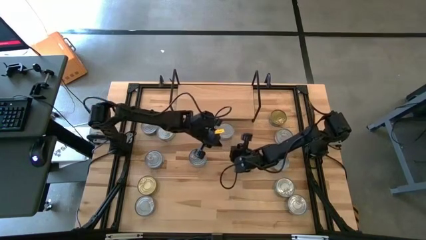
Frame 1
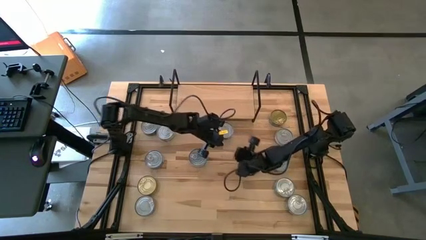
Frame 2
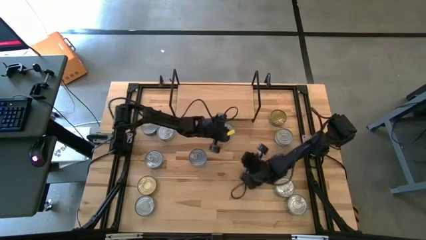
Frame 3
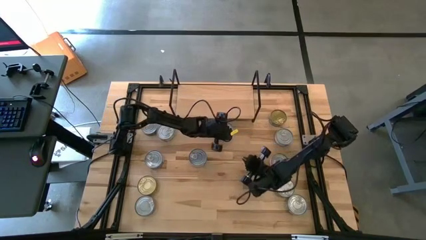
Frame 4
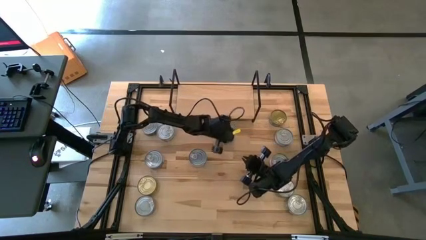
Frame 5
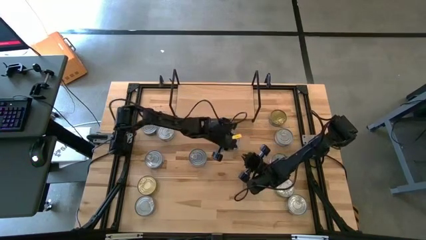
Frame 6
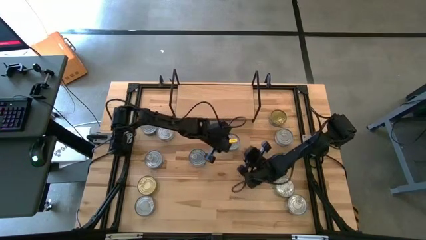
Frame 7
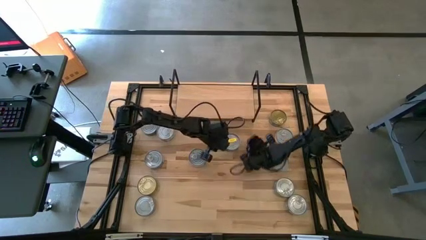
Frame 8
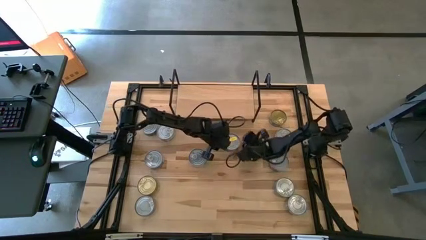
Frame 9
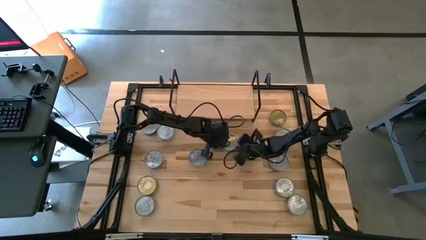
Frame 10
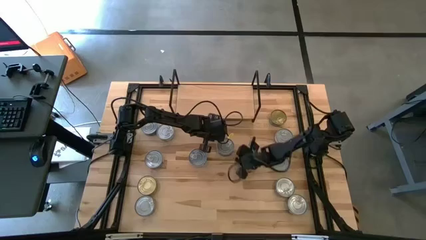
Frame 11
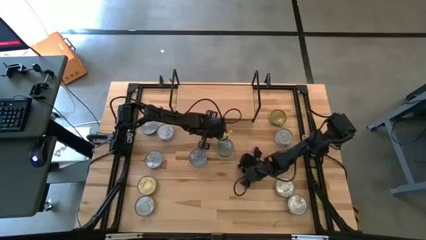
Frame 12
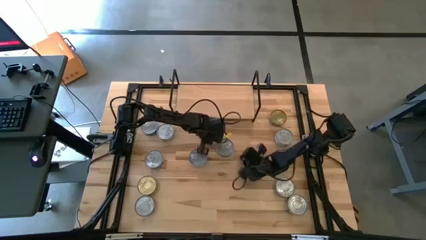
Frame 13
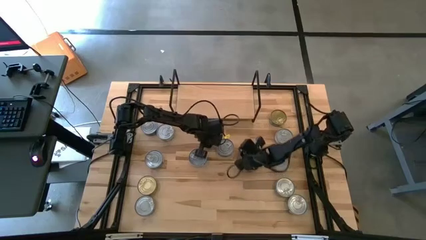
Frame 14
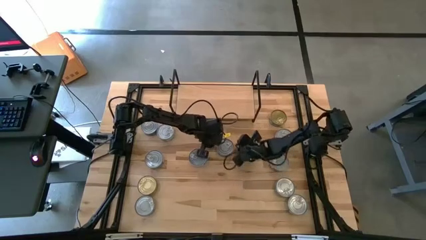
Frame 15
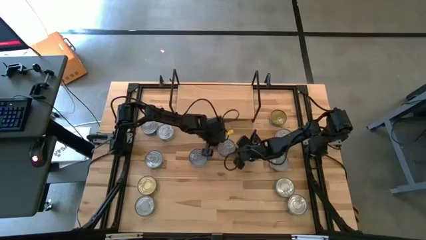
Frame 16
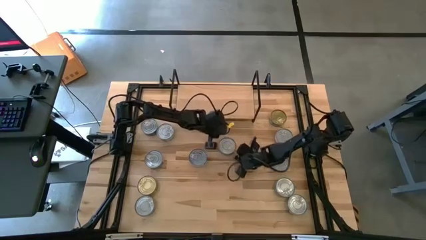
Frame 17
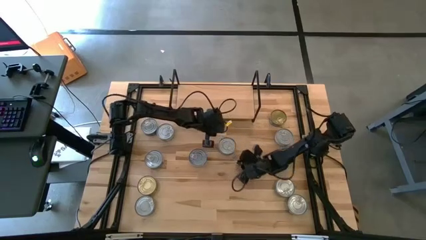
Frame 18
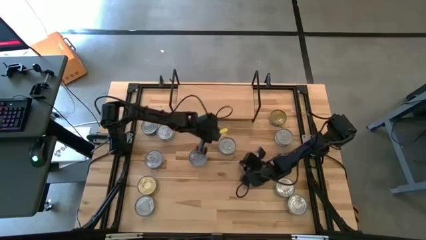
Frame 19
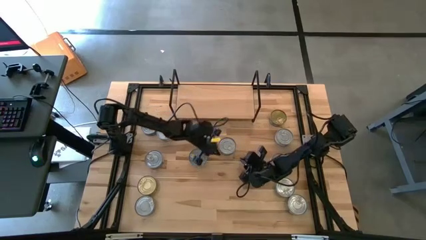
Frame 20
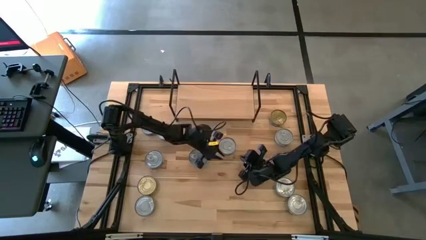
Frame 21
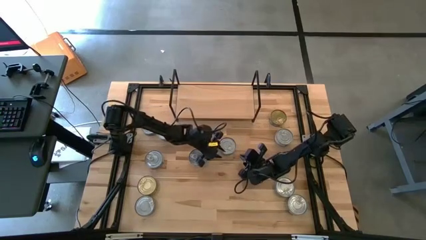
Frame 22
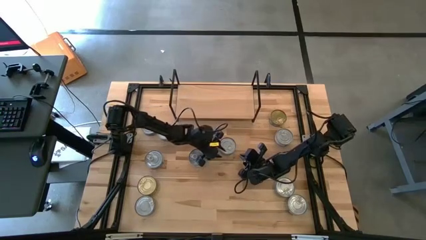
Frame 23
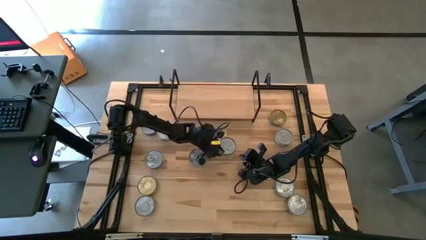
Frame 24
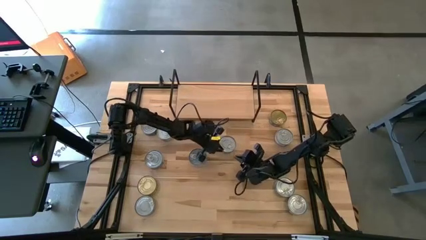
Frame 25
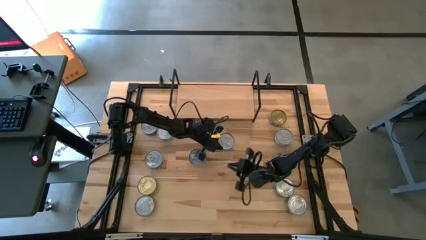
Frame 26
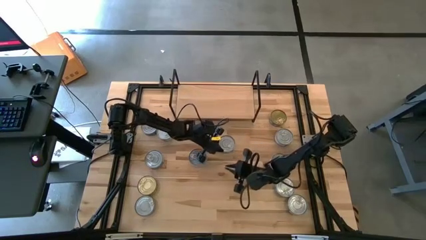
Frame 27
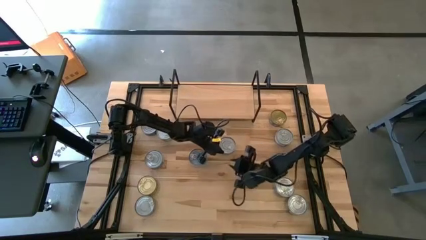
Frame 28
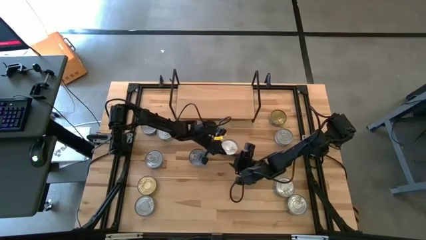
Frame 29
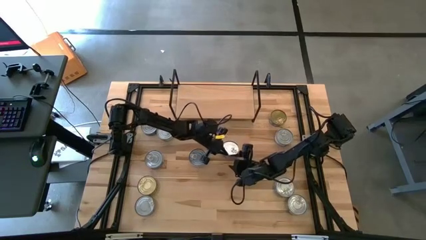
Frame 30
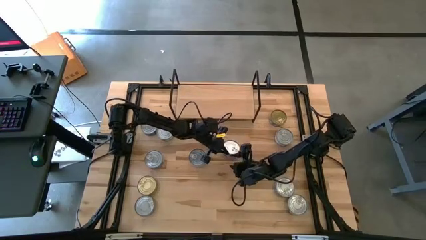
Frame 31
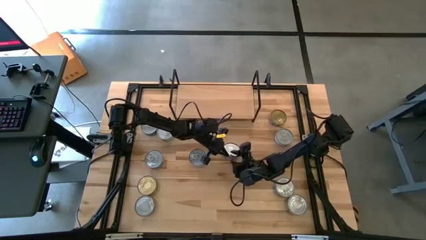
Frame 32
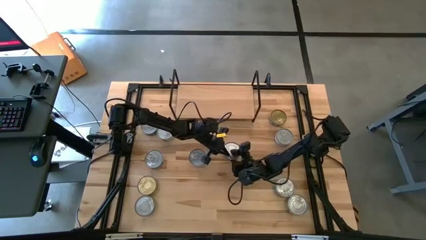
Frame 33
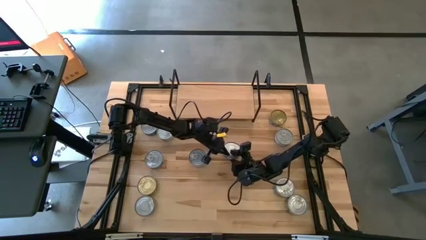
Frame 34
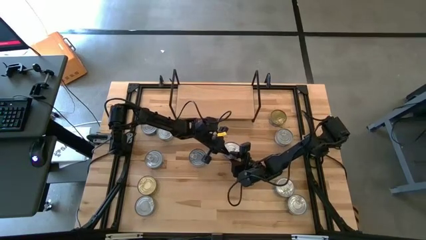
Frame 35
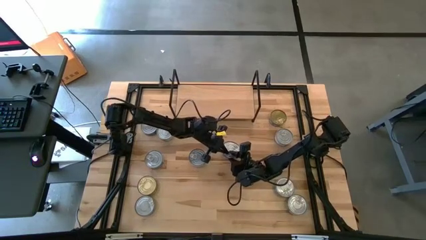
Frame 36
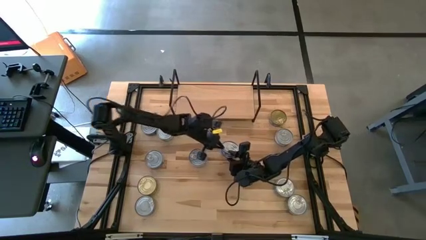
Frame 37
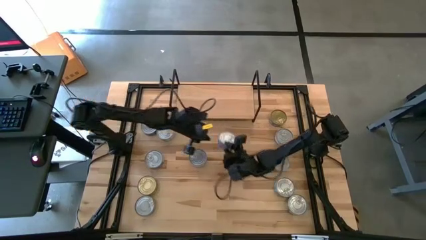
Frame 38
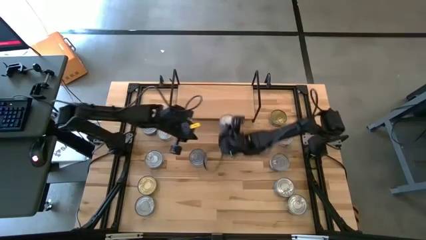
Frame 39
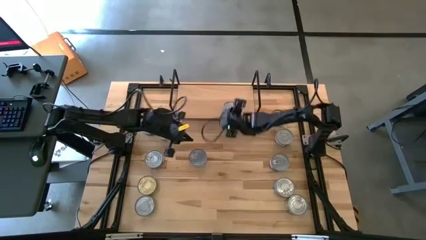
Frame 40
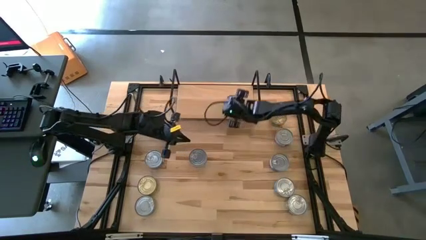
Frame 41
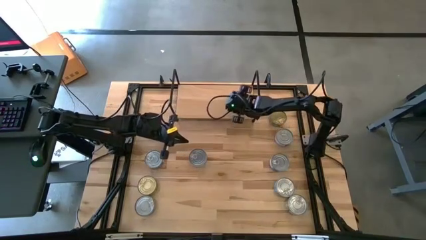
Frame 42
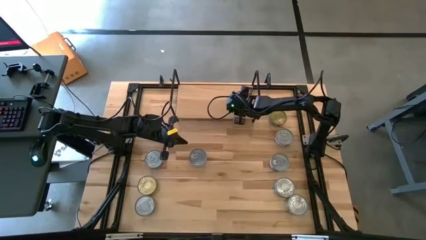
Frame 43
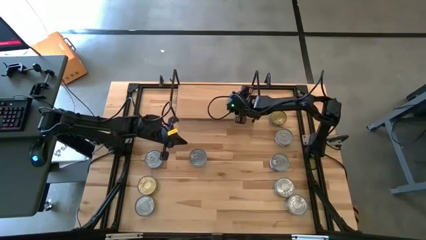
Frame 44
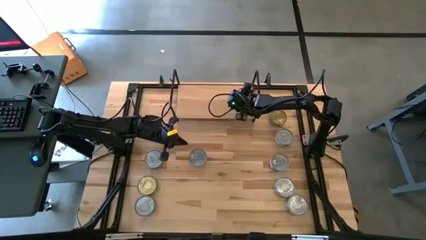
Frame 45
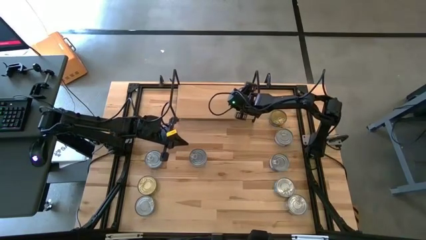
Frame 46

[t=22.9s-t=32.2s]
Task: Stack canned seafood by type on shelf
Put the blue tuna can on the shelf

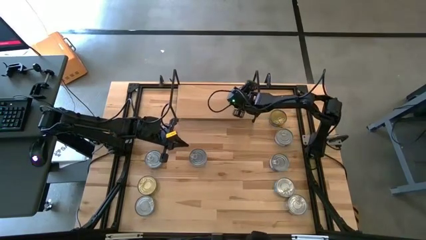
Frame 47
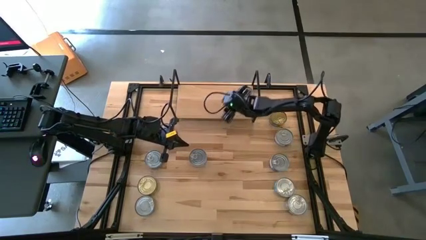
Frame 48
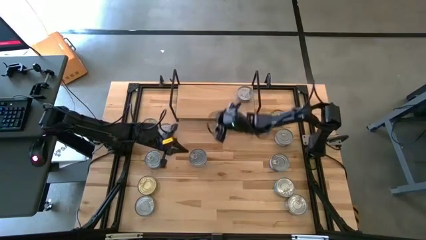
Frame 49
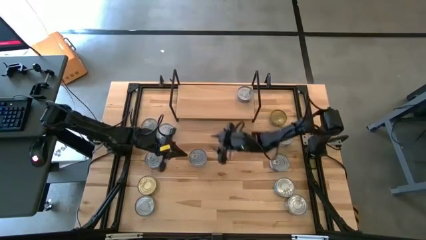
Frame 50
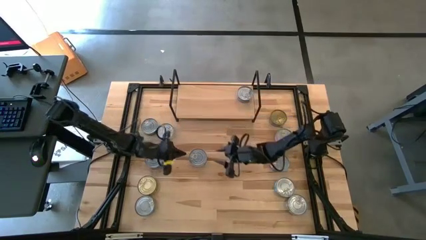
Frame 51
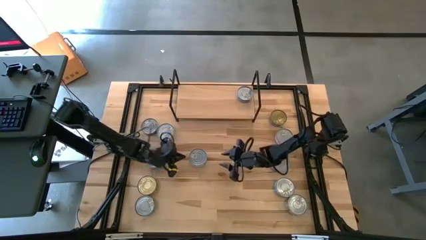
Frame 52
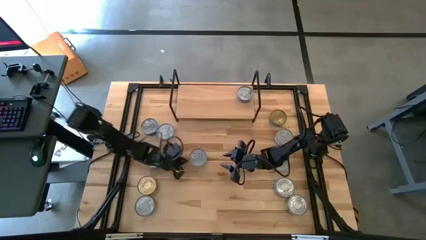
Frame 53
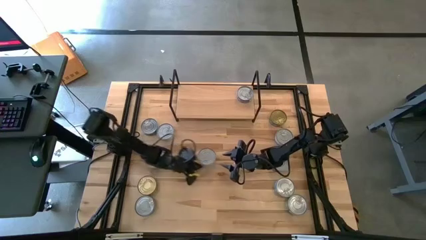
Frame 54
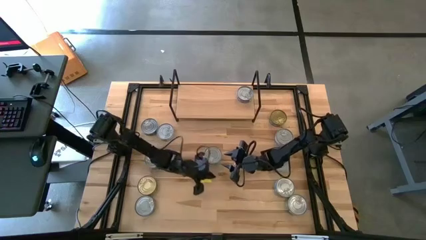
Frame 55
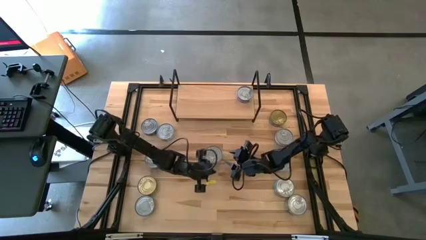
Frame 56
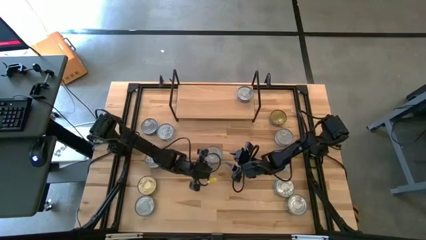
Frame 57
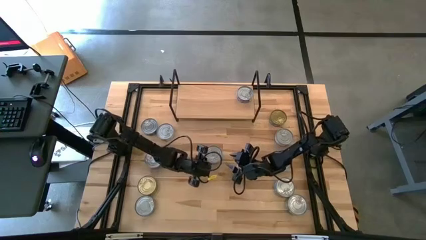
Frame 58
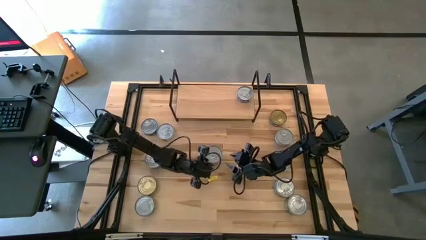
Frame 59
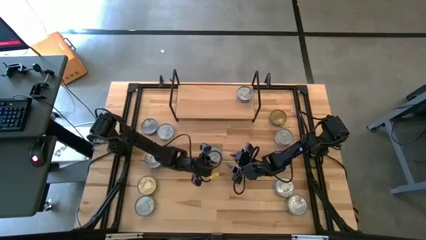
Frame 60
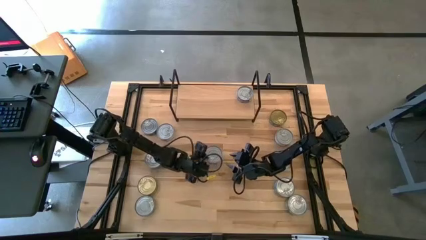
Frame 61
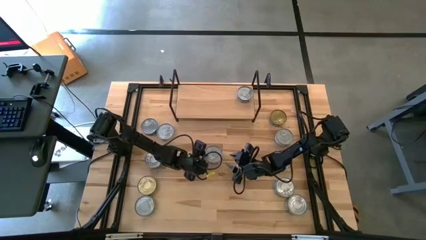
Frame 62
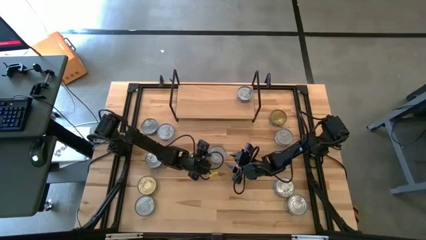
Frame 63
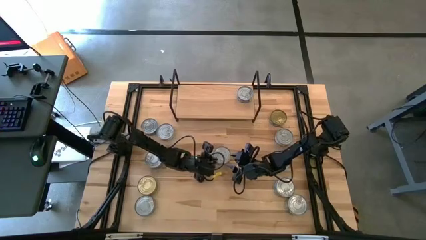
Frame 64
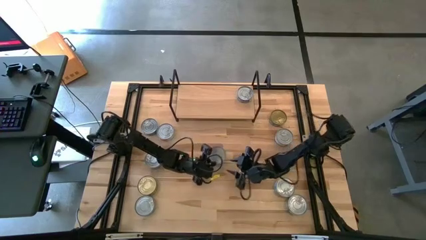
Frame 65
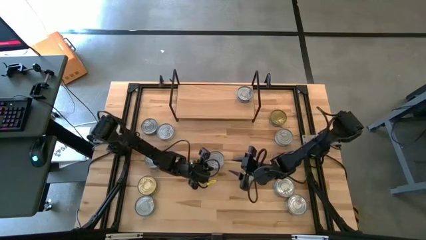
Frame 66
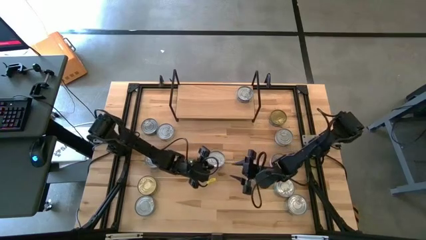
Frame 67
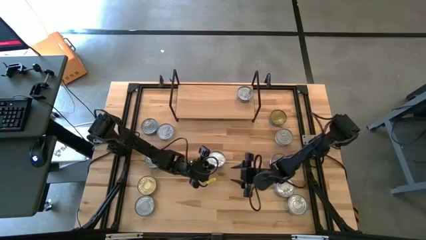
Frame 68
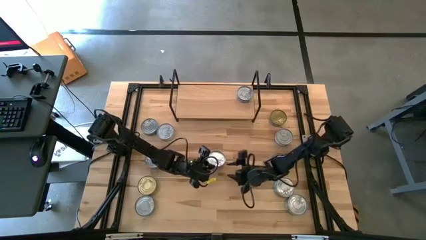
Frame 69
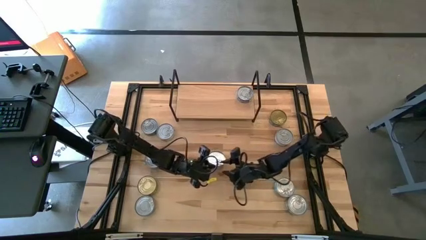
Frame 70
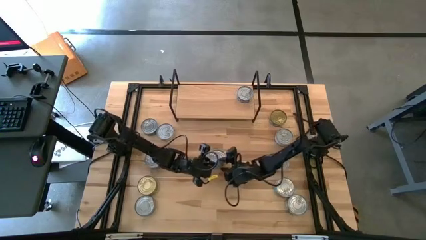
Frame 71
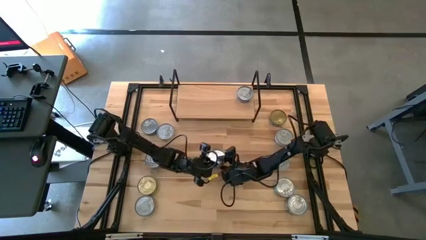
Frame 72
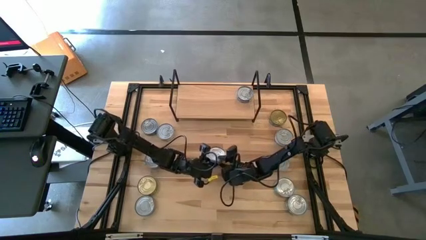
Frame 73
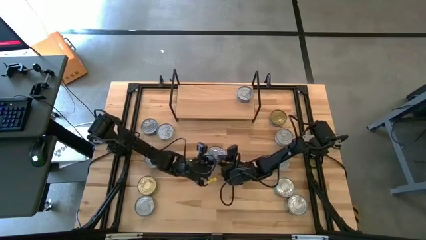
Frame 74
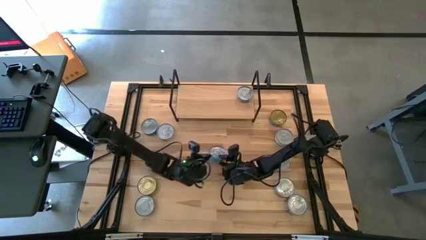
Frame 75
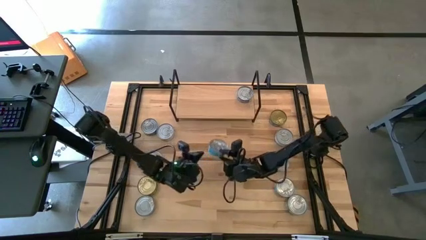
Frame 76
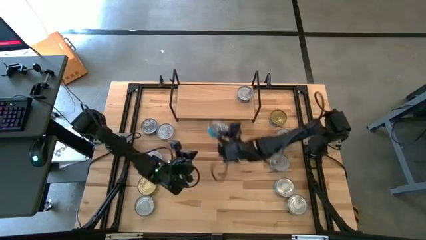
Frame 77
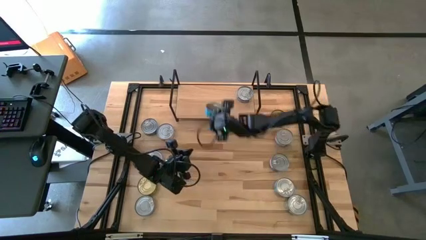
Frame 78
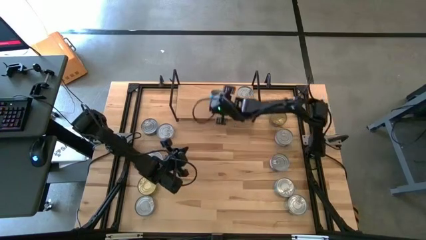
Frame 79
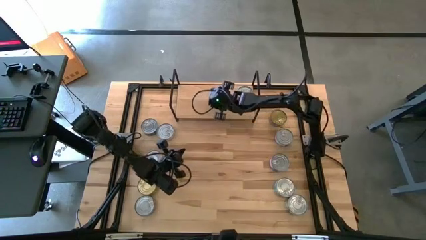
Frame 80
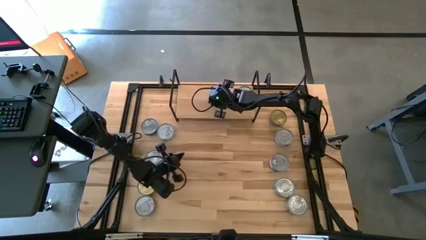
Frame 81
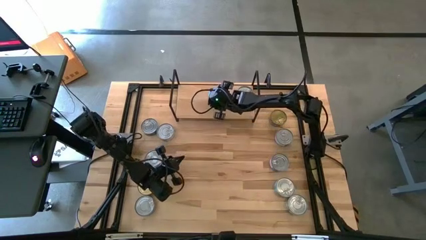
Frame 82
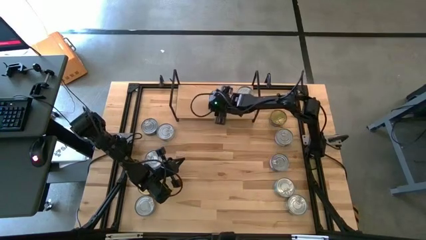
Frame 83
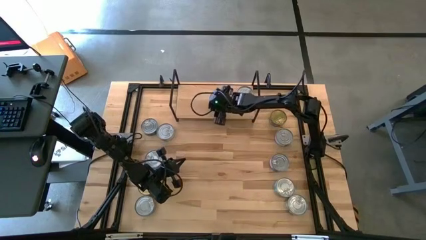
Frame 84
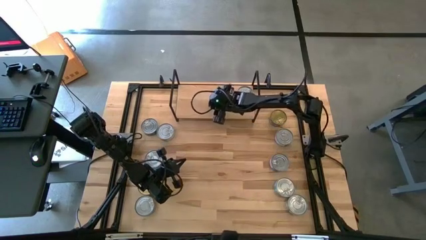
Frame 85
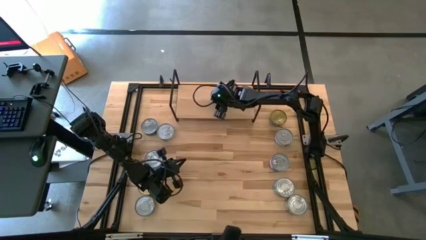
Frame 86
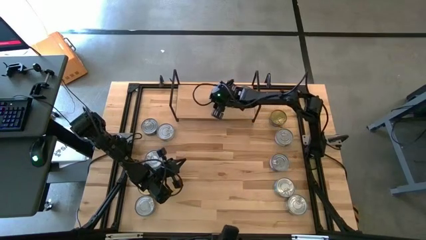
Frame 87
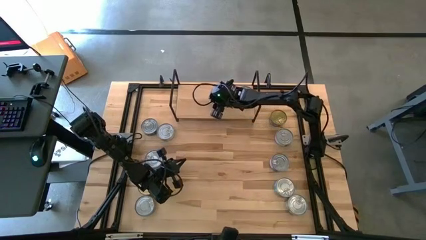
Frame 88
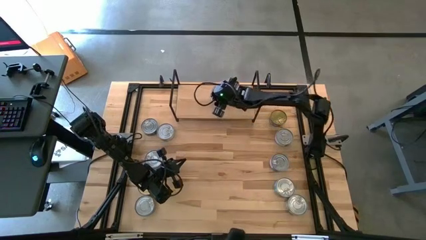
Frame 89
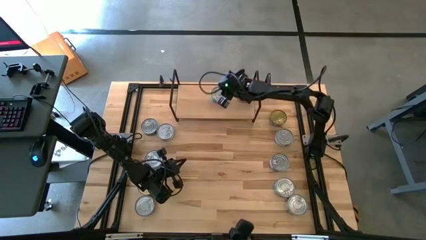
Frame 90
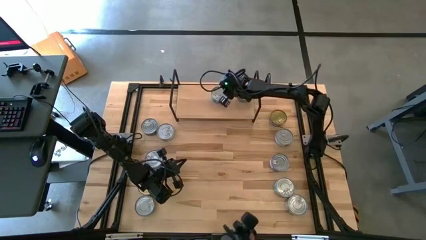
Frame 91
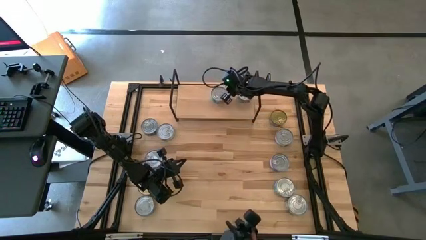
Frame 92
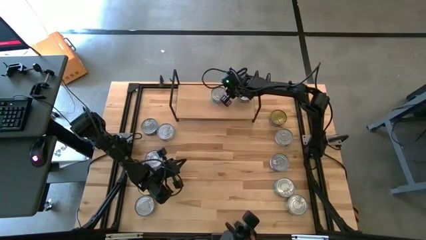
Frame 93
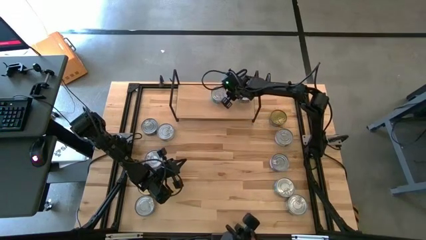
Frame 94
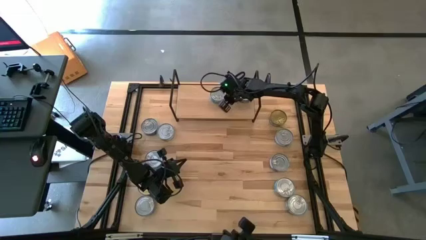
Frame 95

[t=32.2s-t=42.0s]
Put the light blue tuna can on the shelf
